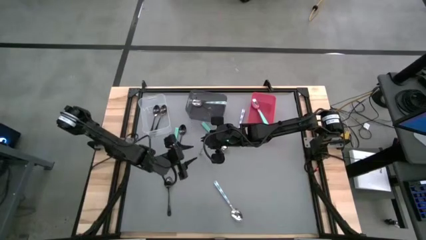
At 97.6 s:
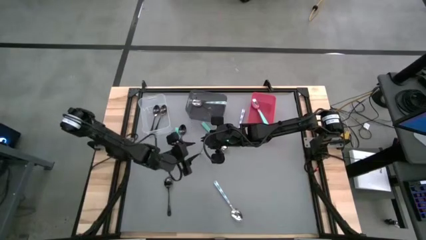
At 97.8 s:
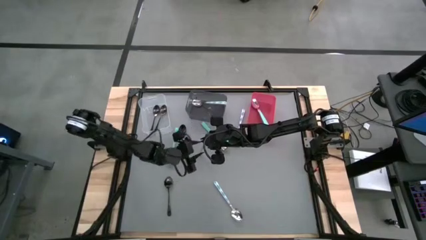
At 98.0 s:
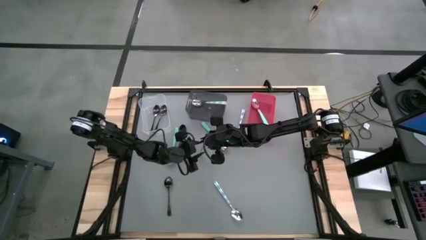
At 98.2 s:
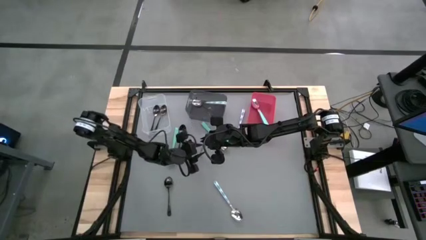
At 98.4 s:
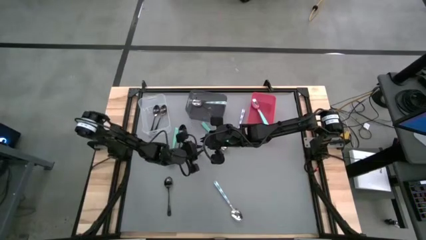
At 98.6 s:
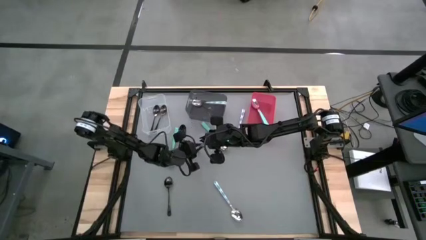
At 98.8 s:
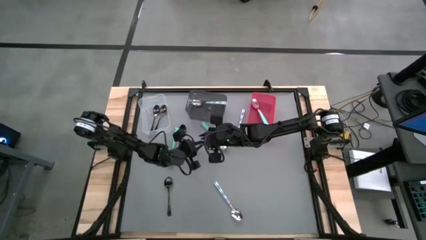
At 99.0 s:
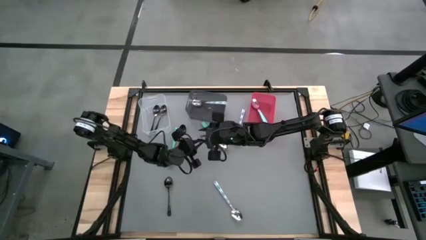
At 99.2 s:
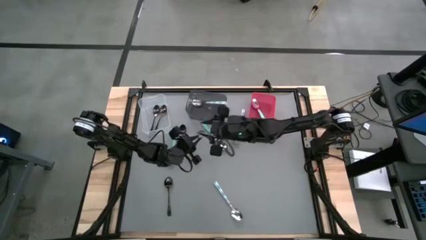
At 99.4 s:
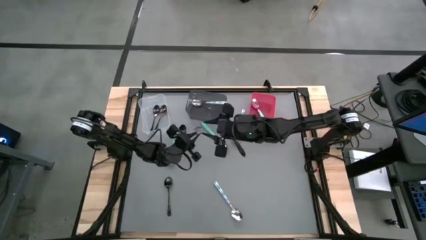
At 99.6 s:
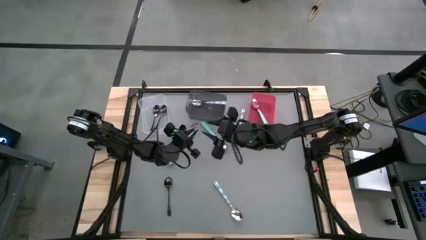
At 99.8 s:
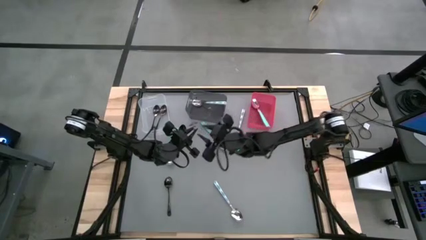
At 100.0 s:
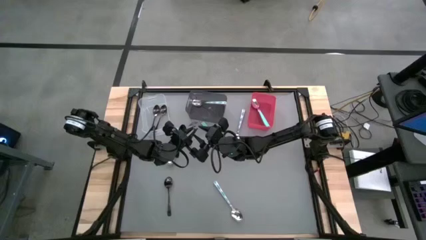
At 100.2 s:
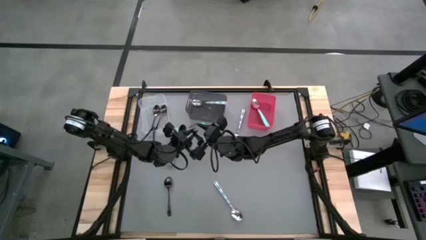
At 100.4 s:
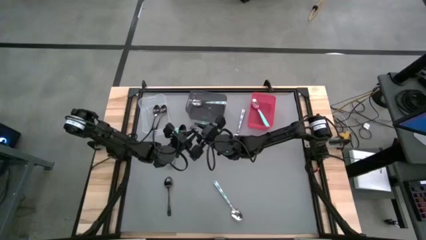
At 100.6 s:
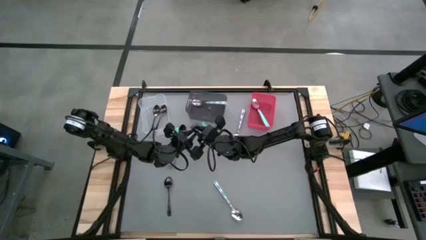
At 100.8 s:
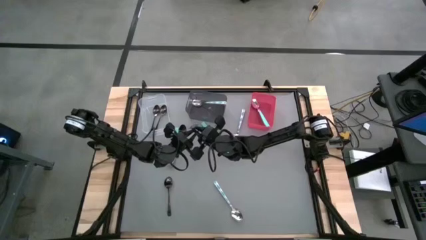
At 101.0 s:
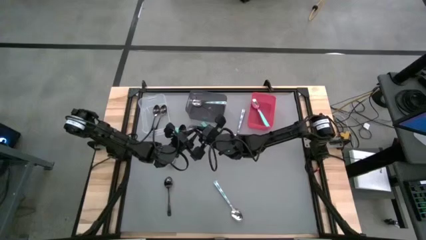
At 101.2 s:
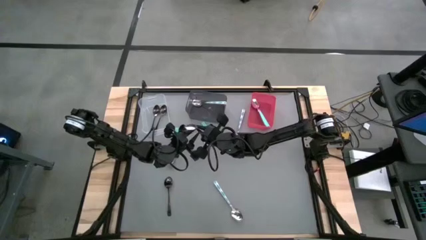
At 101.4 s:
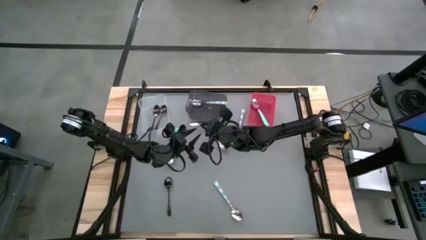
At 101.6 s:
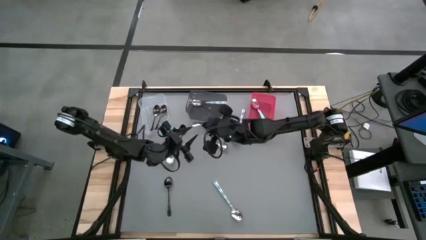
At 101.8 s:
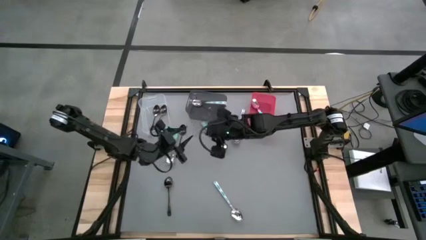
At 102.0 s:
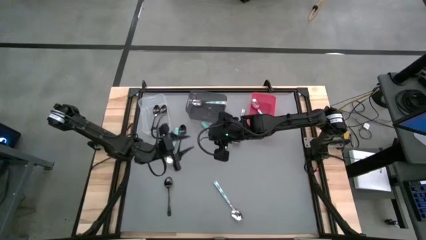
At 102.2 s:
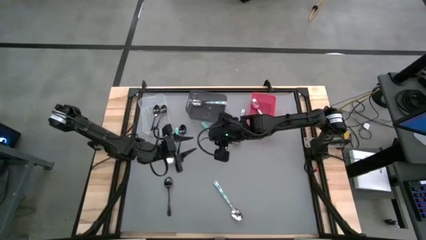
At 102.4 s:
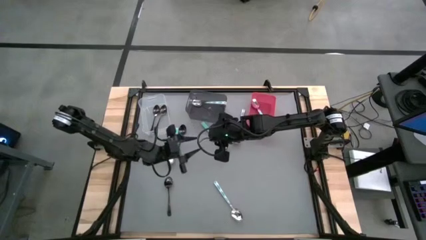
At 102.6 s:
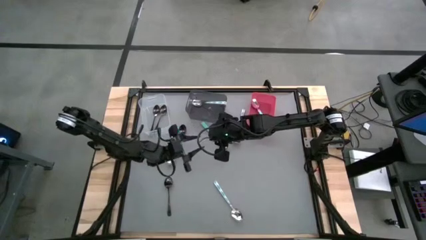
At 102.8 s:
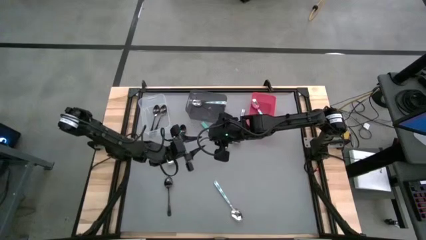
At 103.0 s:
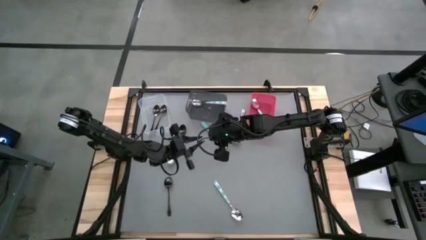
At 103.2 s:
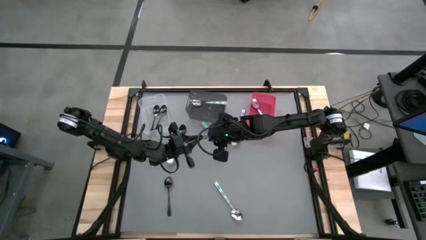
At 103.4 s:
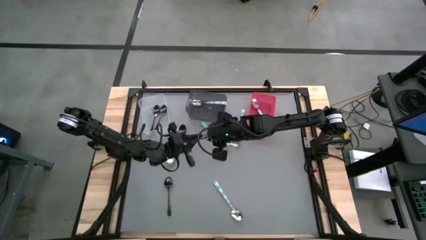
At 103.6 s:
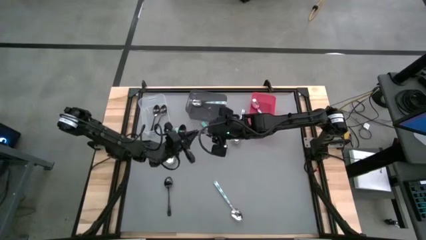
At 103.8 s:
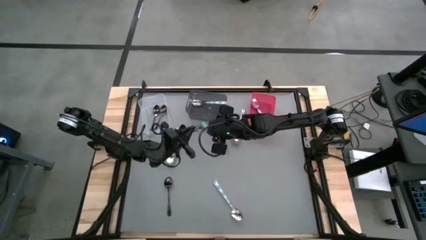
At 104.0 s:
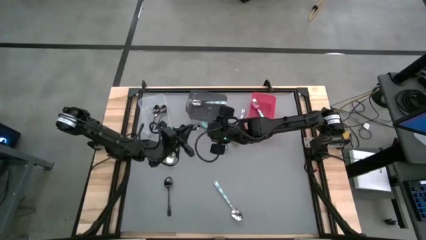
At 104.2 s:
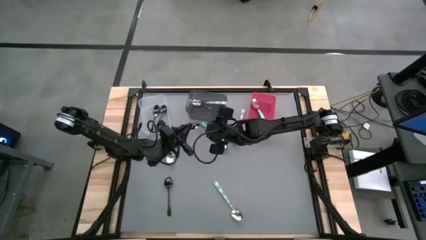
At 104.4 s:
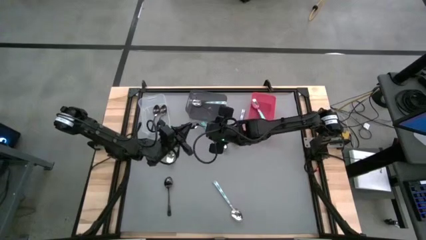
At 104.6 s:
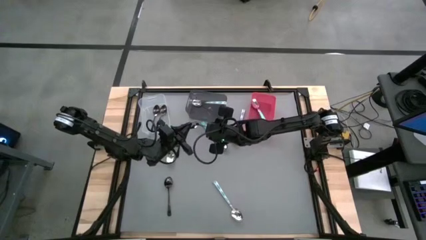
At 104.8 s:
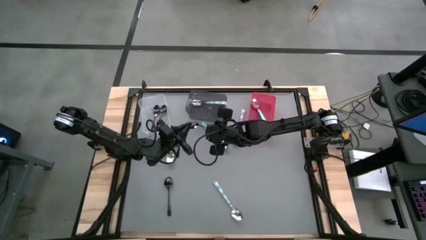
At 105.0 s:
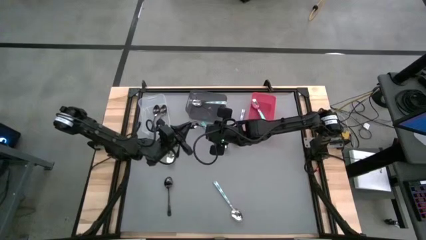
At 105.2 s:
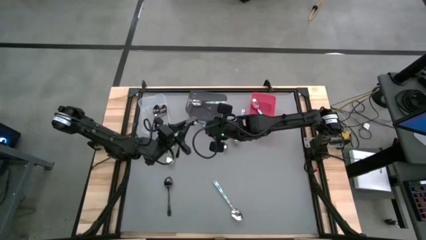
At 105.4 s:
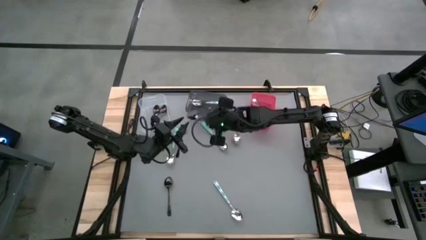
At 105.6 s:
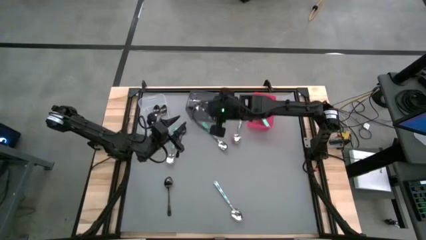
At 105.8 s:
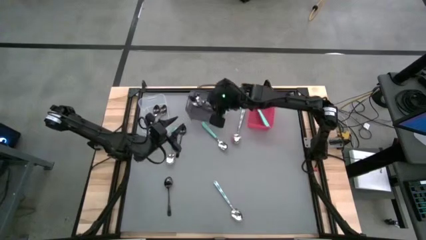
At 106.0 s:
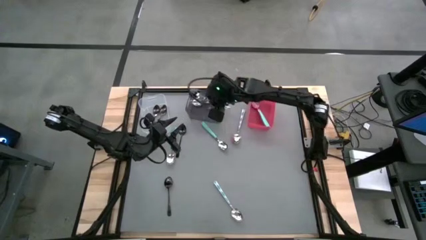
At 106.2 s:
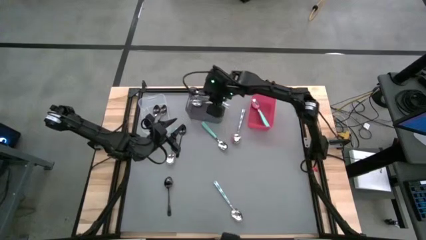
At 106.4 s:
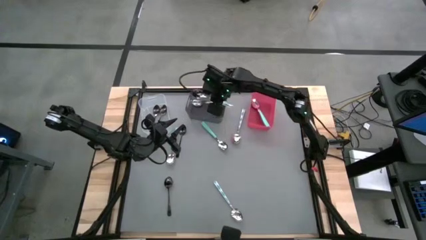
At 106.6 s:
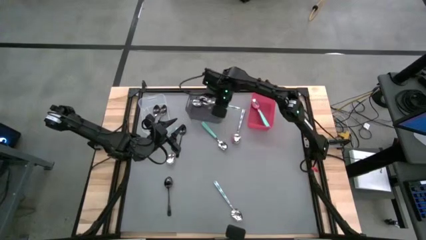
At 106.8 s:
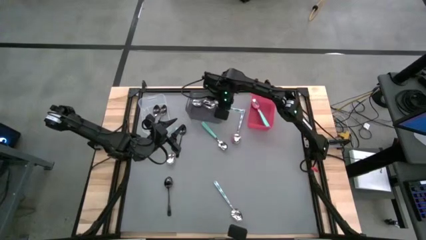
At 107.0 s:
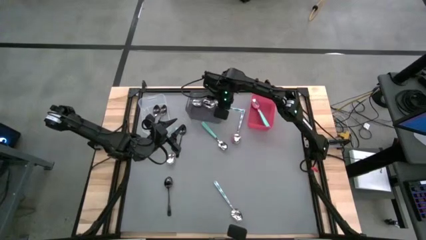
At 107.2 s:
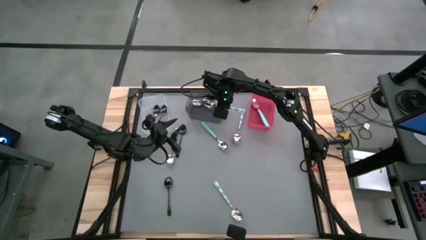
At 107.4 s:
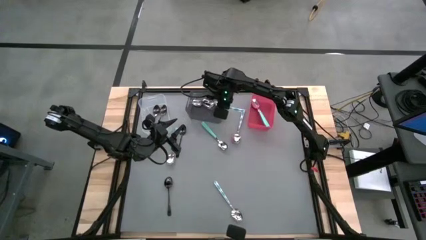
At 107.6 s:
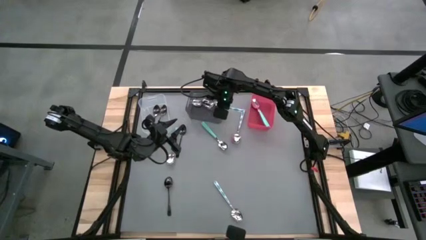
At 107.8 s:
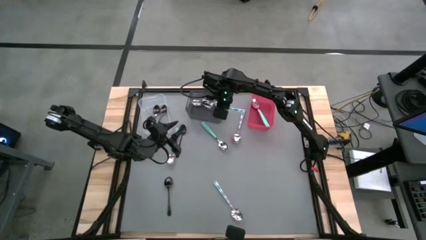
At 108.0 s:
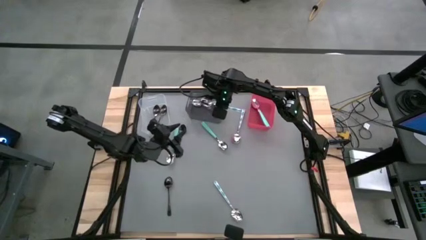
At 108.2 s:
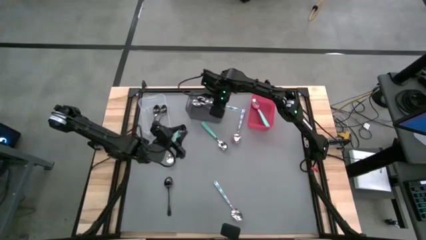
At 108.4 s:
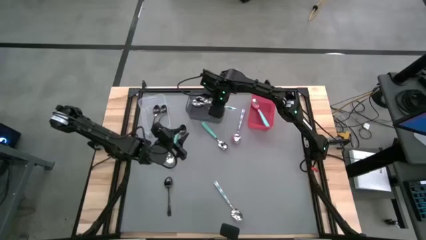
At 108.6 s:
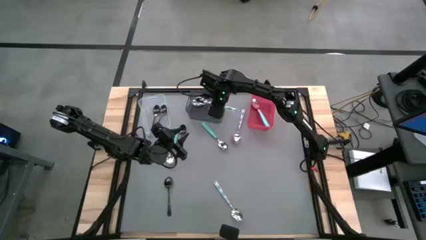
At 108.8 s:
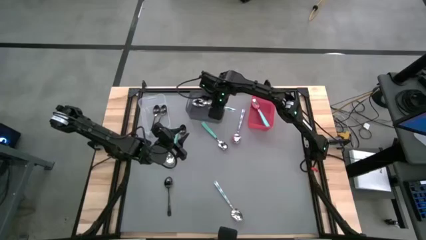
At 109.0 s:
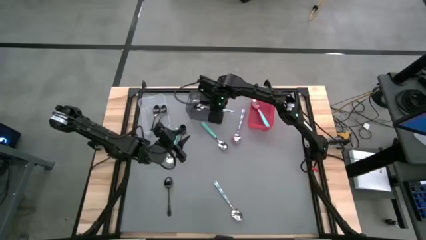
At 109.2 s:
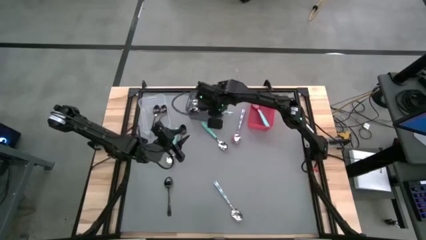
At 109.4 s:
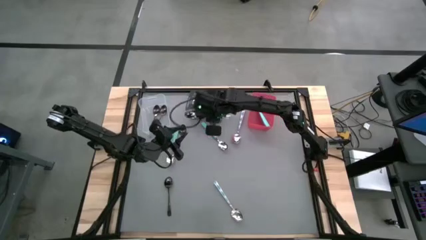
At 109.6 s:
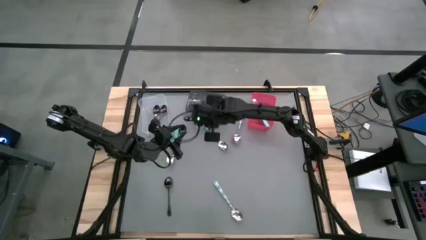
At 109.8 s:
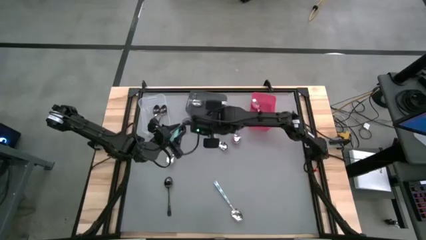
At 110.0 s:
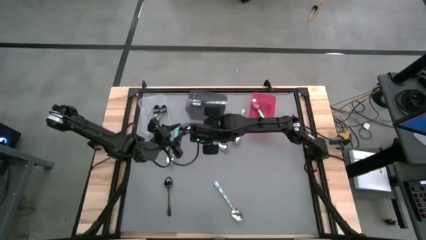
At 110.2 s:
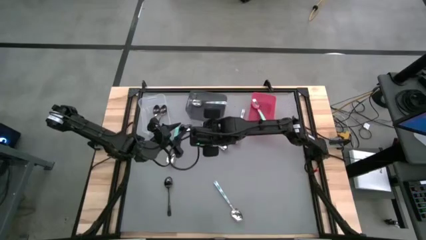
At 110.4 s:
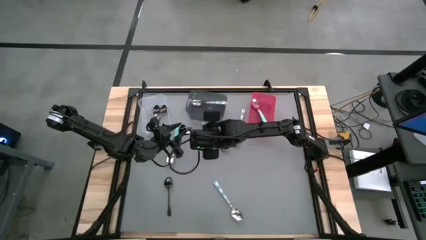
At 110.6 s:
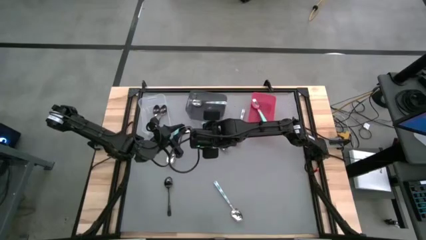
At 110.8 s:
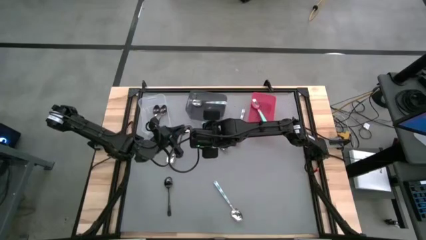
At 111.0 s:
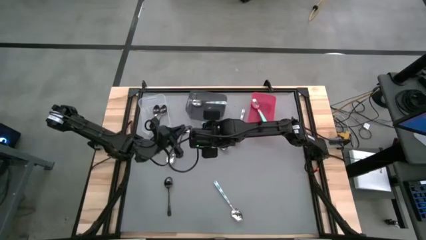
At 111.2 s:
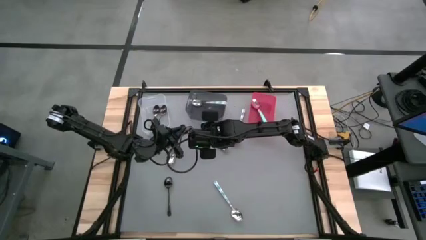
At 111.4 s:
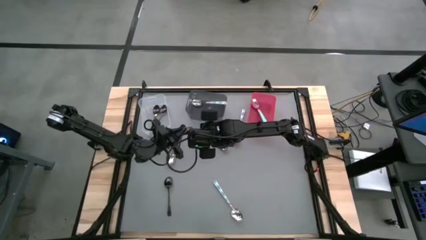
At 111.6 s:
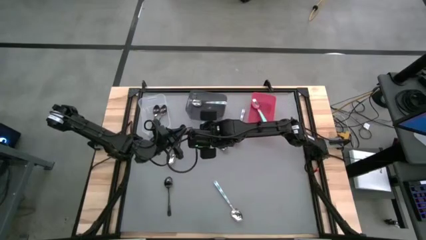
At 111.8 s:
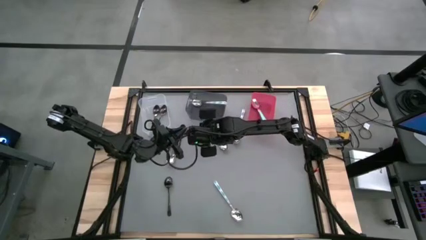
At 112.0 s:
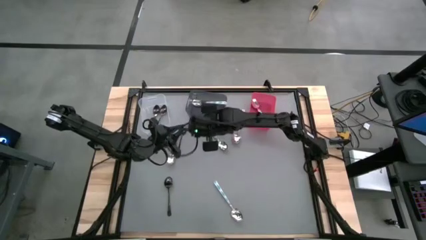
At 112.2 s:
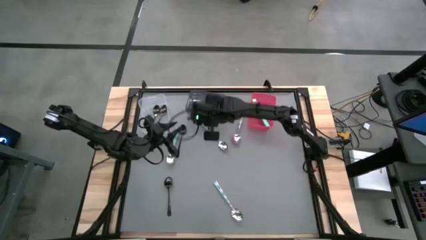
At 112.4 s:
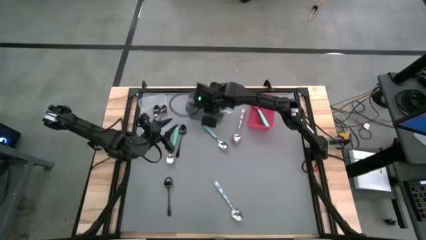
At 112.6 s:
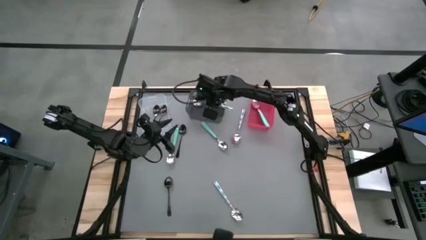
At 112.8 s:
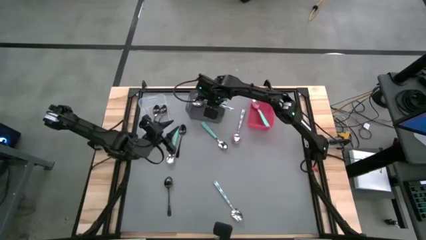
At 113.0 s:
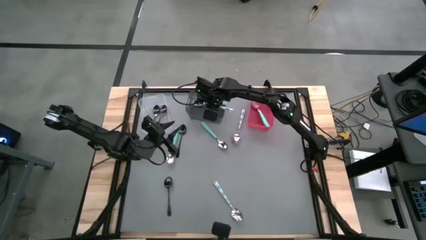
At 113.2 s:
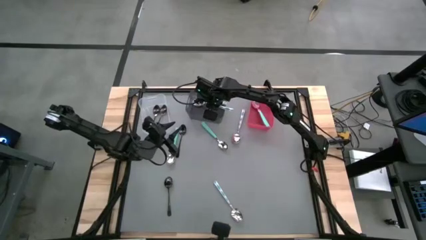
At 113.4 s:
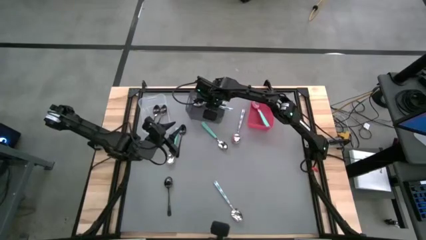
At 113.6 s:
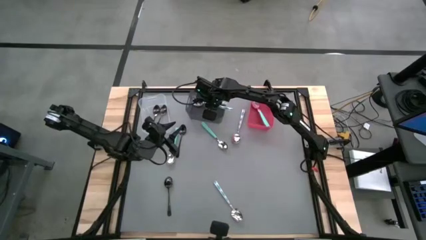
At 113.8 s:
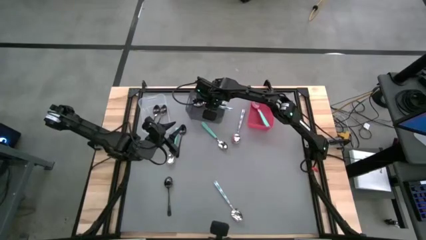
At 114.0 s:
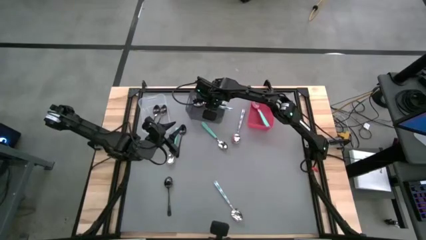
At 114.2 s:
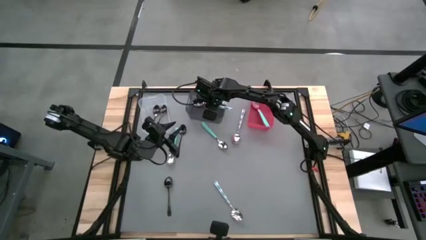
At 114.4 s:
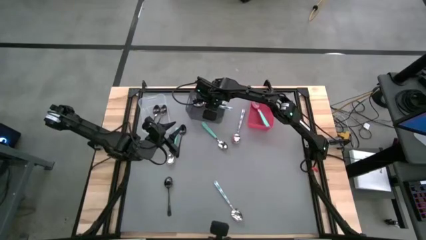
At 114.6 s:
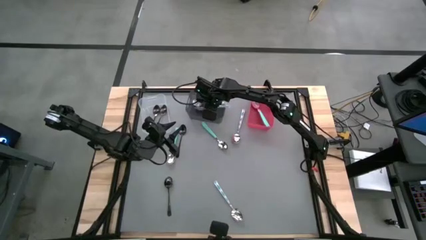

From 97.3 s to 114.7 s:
Task: Sort silverware by color (type)
Put the middle blue patterned spoon into the black bin
